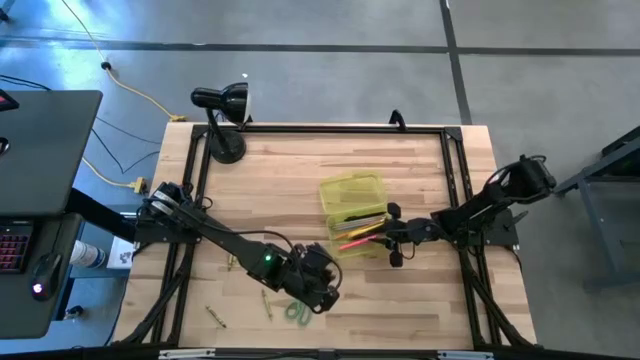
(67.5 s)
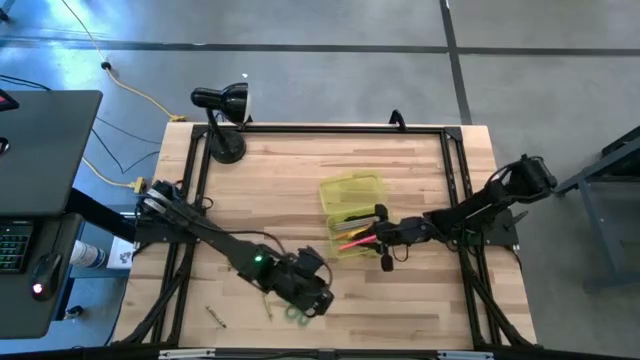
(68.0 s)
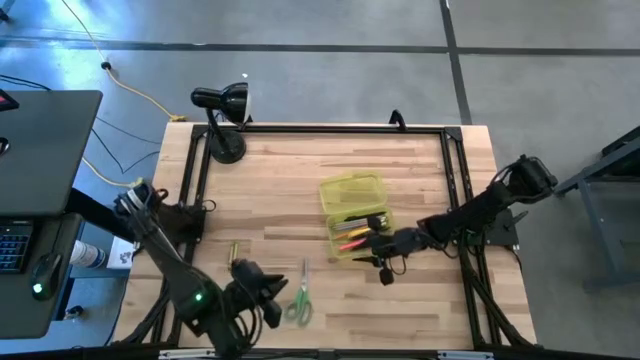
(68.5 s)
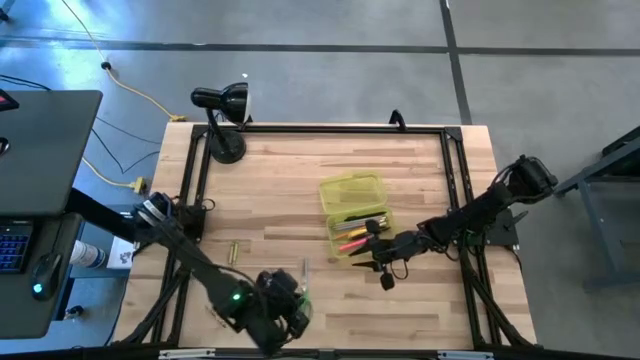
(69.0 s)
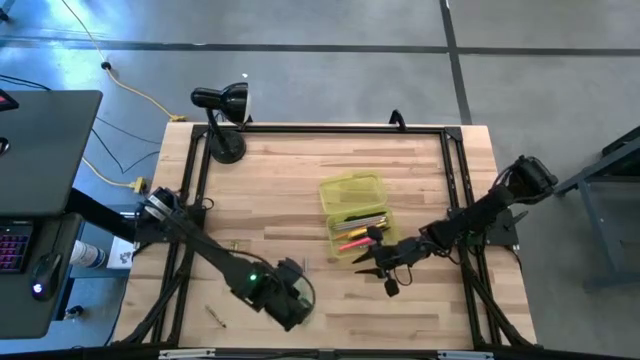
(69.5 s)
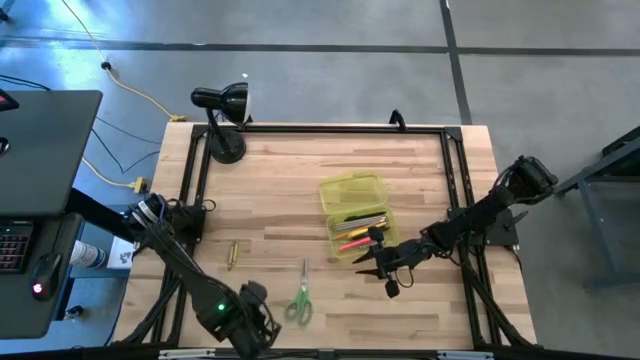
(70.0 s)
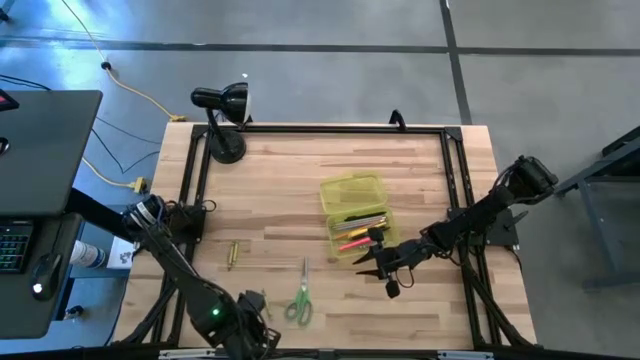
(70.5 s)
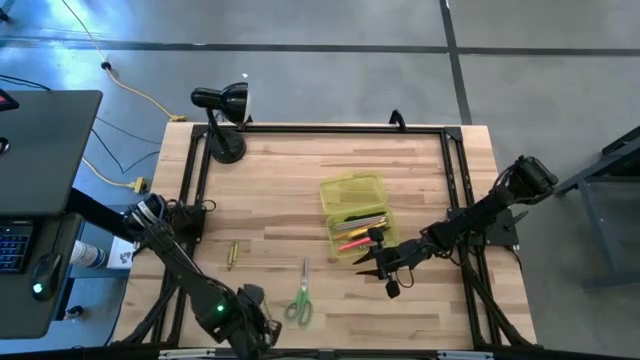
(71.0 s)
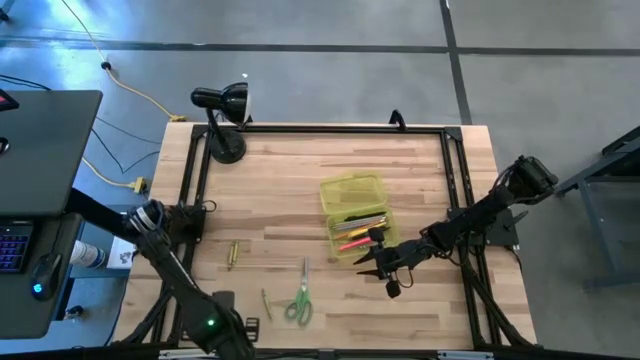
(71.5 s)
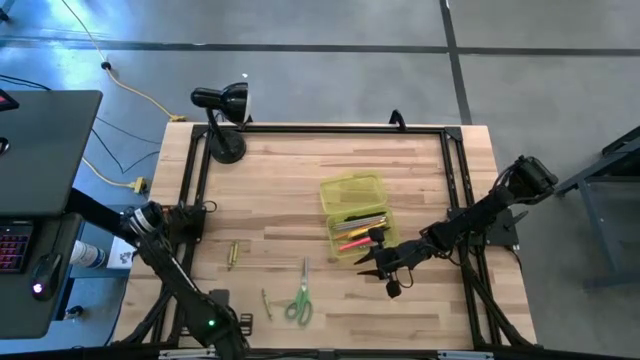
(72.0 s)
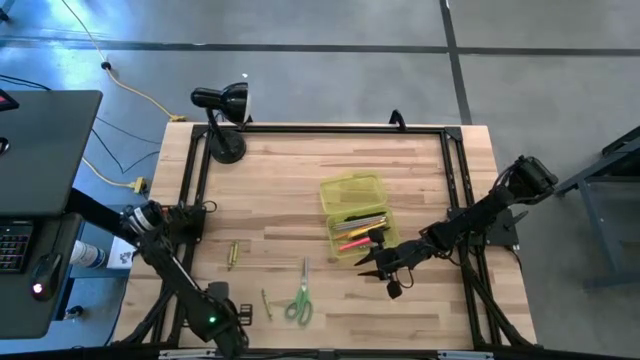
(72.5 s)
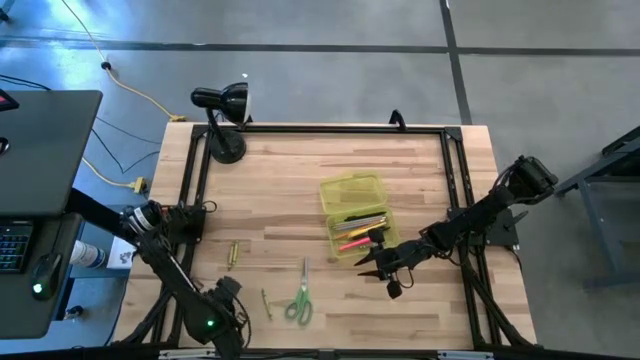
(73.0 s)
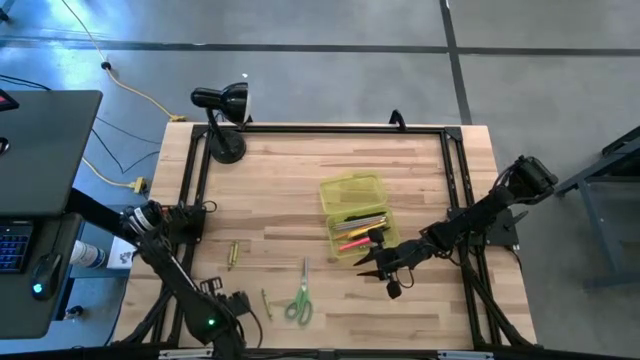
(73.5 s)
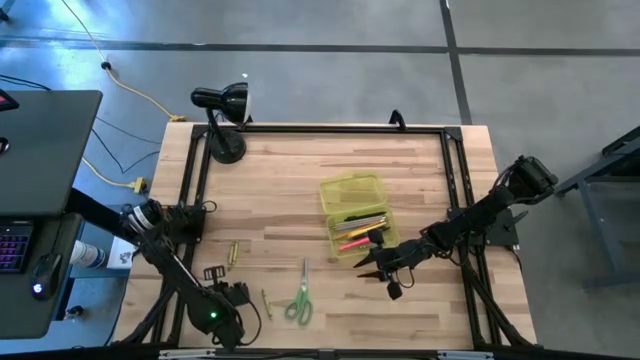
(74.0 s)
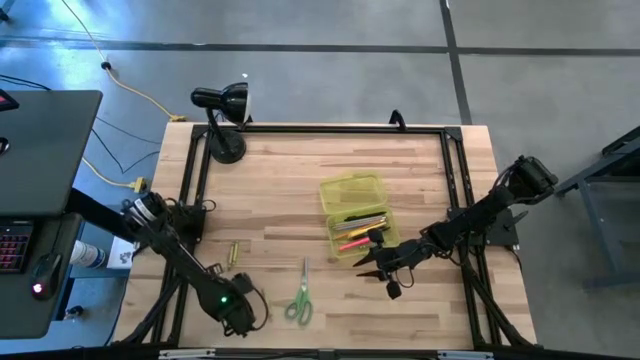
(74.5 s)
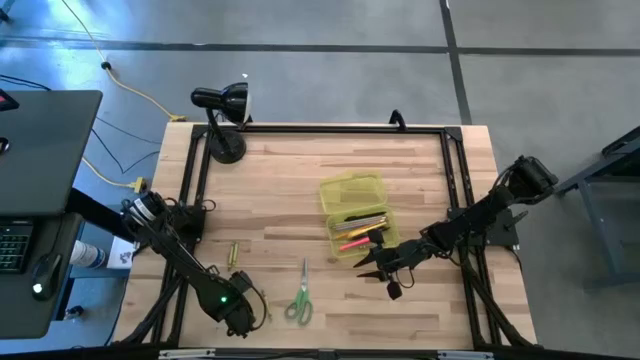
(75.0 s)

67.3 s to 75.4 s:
Task: Pick & place school supplies into a supply box
Put the green crayon into the yellow supply box

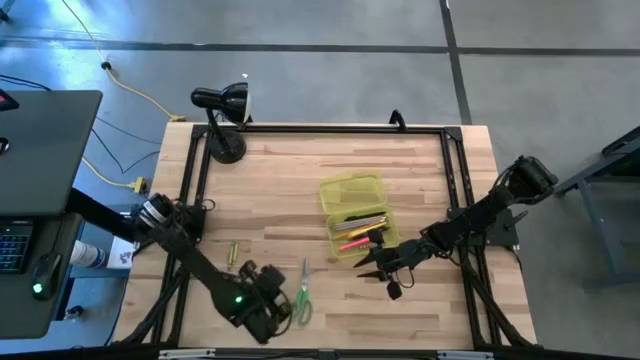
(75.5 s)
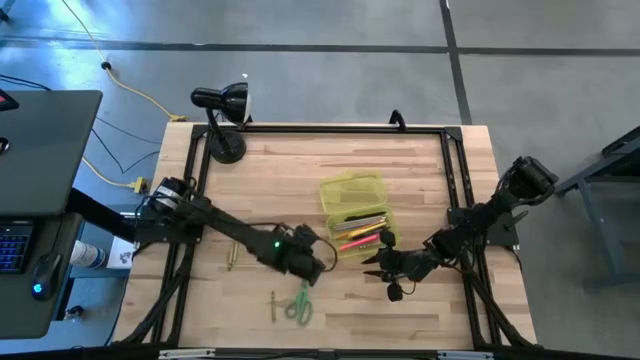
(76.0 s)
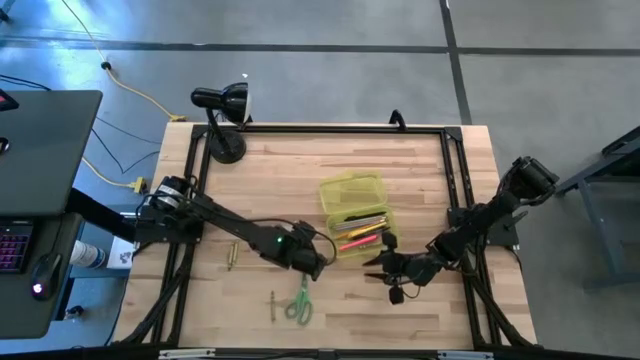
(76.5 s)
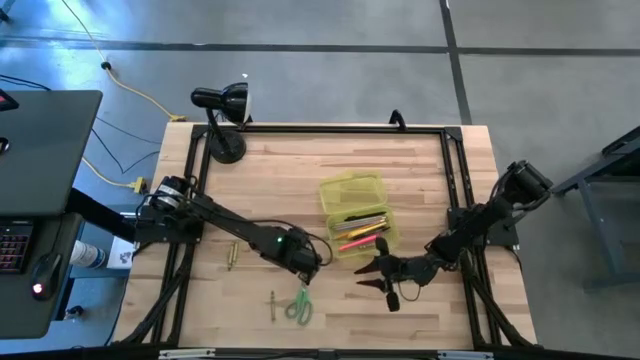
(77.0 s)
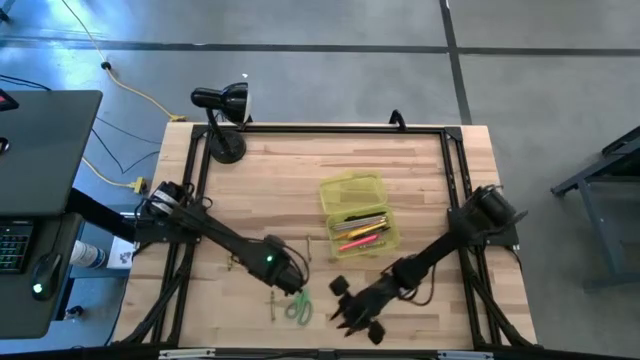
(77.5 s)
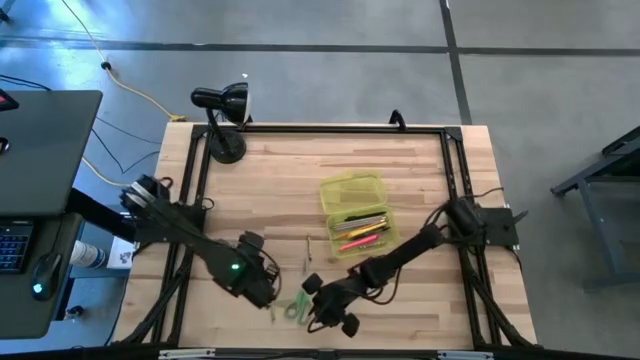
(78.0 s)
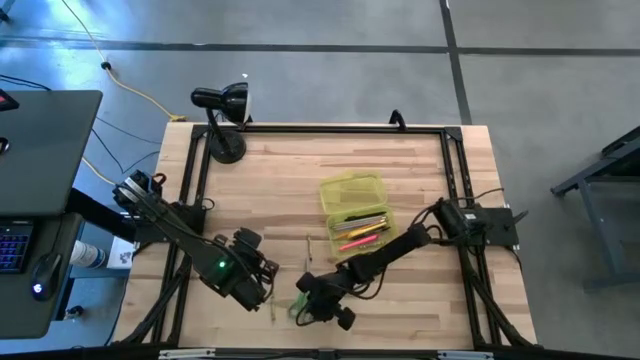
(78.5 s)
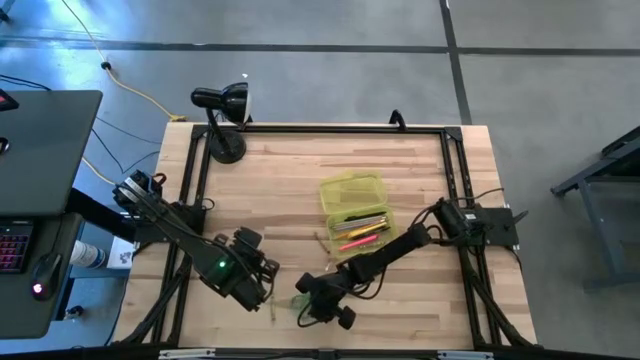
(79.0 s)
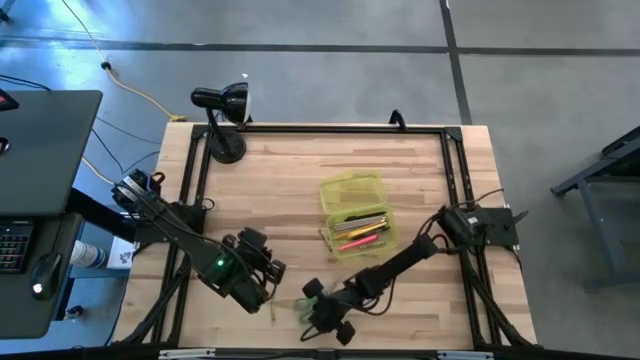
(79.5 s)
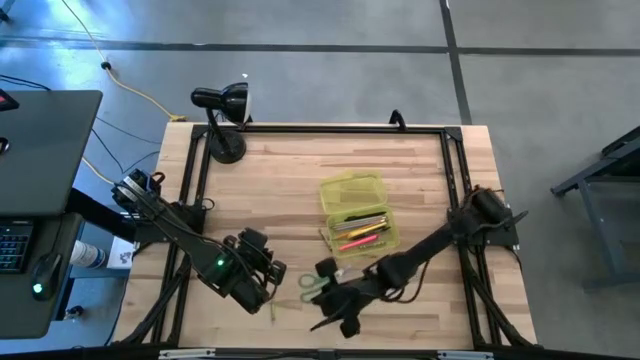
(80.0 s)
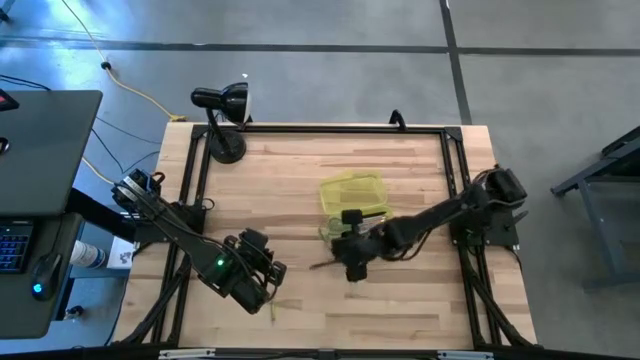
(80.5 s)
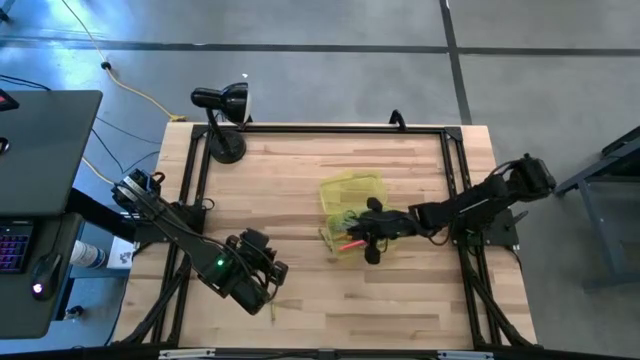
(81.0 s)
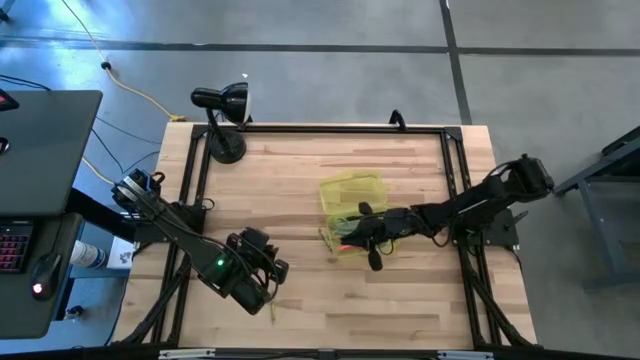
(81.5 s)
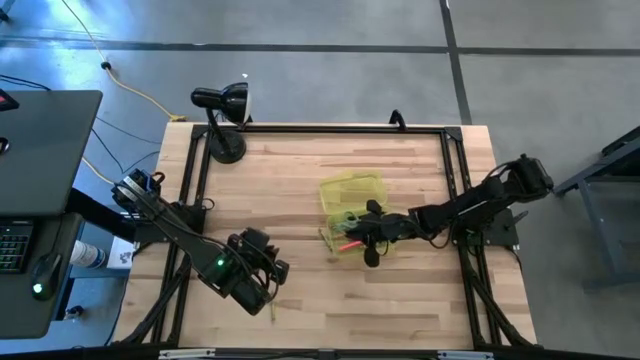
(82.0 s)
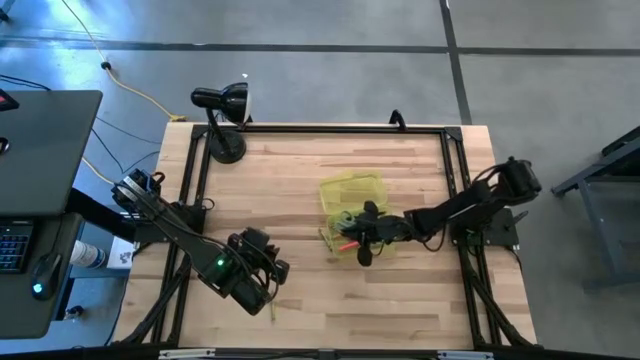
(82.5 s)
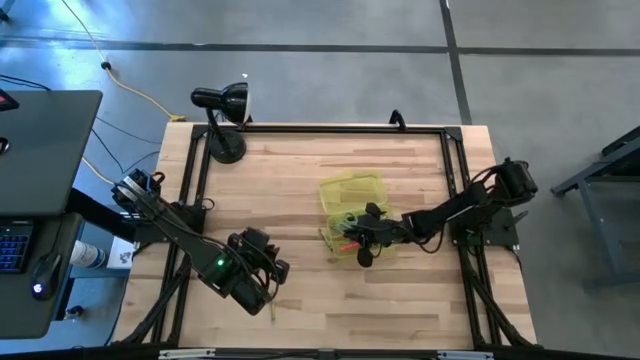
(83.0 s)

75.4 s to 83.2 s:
Put the green scissors into the yellow supply box

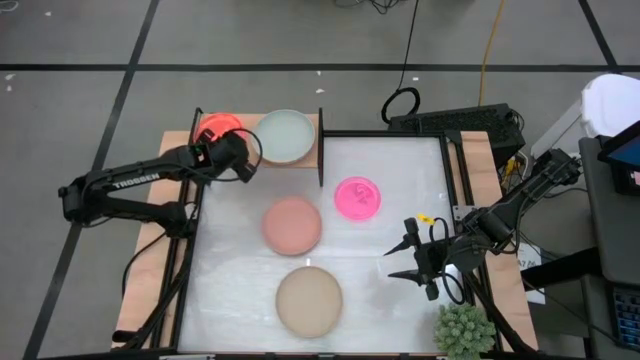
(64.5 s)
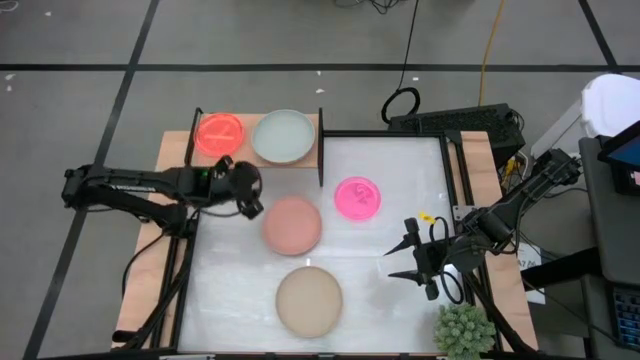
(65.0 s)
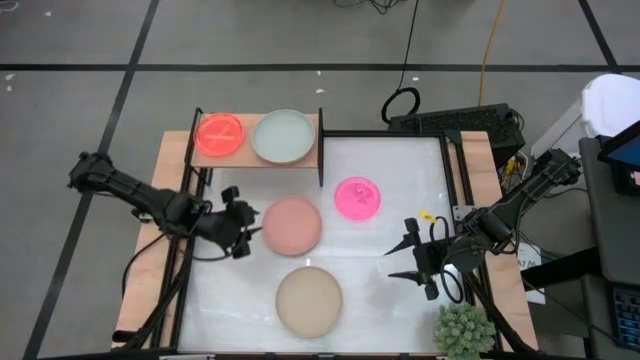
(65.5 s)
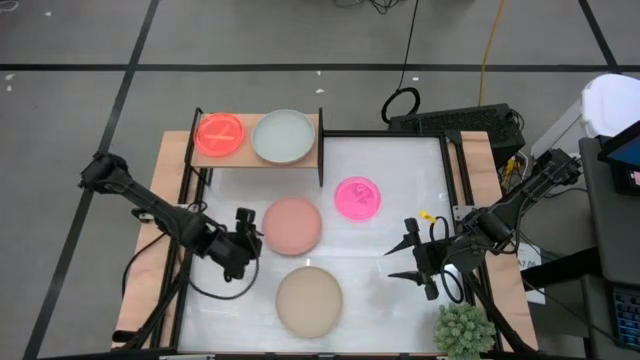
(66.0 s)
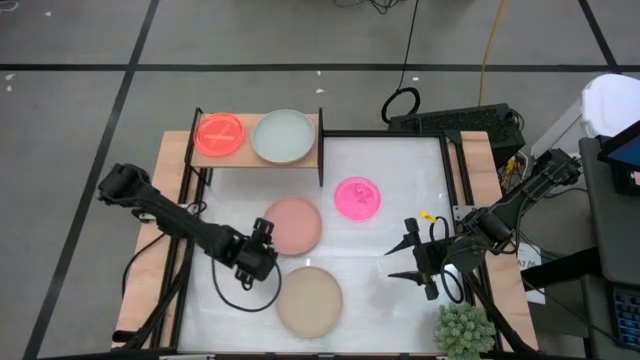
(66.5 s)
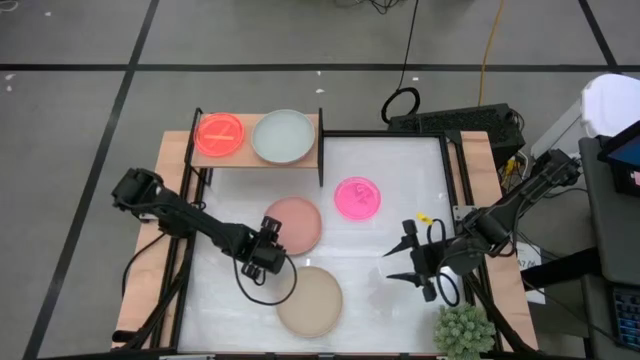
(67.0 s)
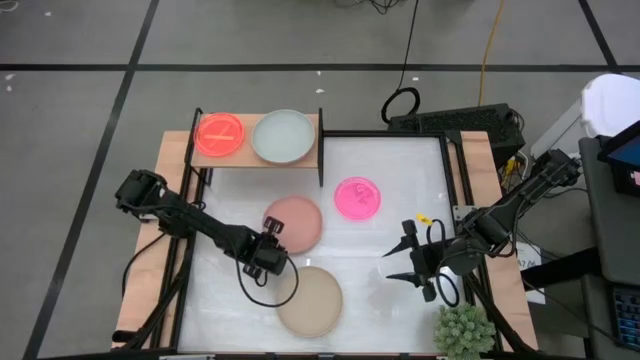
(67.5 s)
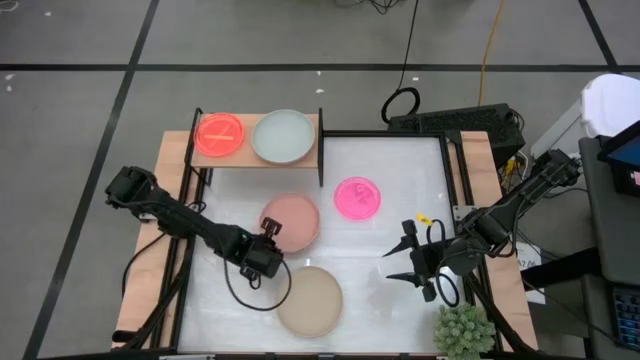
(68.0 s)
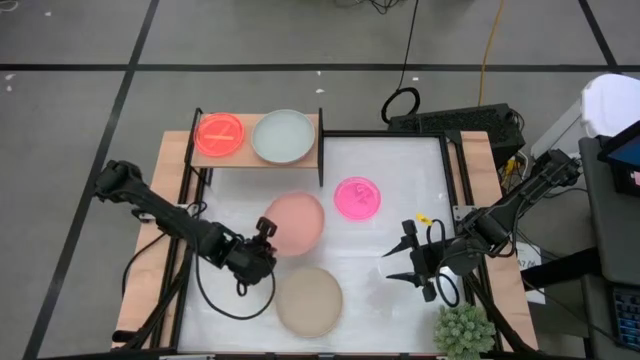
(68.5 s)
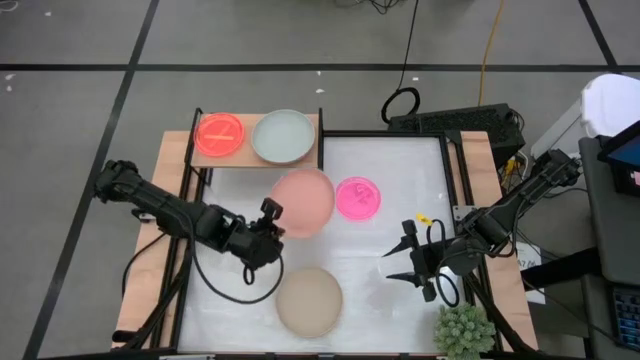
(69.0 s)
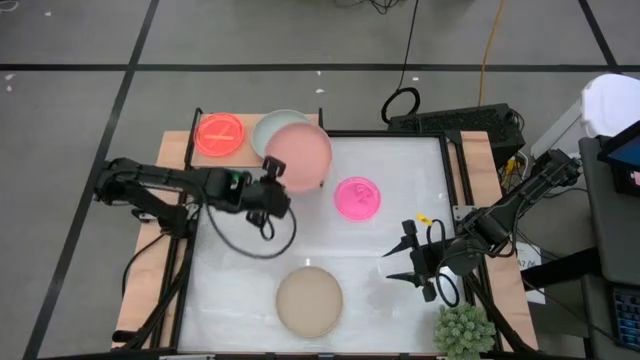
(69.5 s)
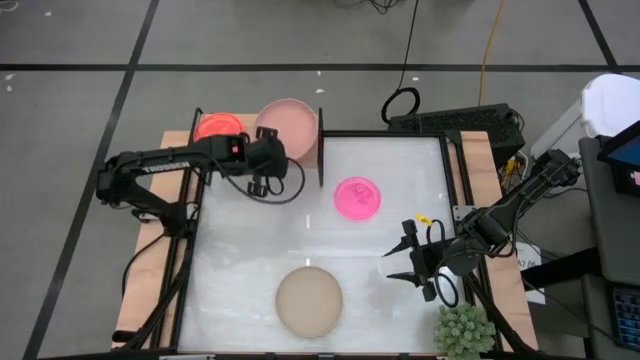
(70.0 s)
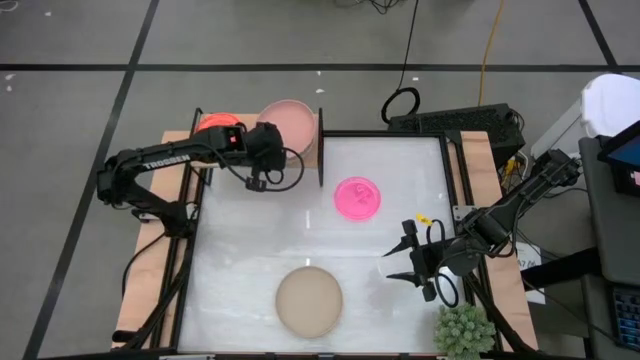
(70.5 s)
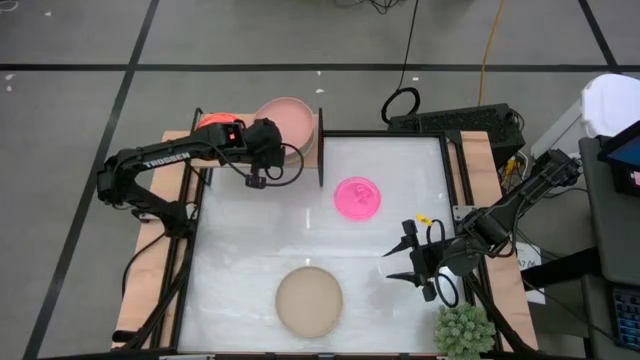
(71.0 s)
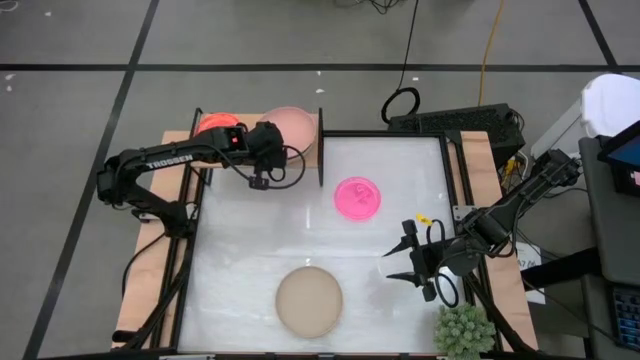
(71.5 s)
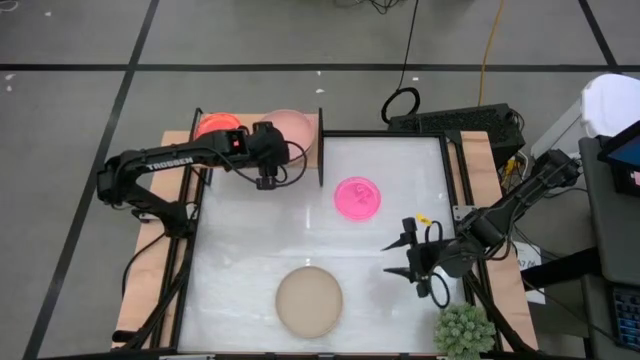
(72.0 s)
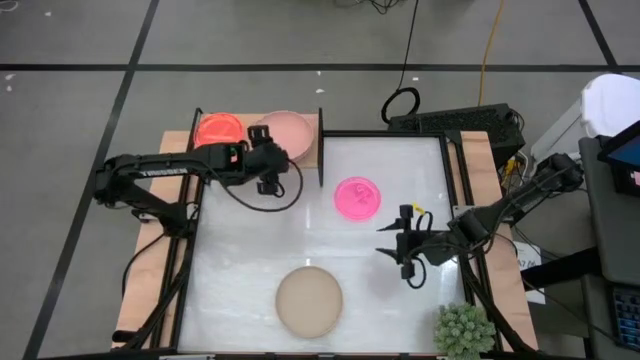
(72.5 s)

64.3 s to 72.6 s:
Task: Place and stack plates onto a shelf
Stack the big light orange plate on top of the big gray plates
